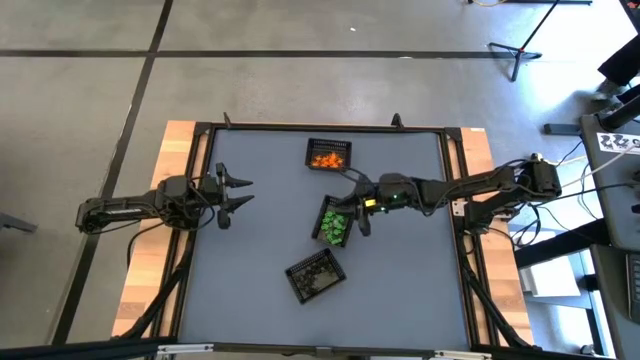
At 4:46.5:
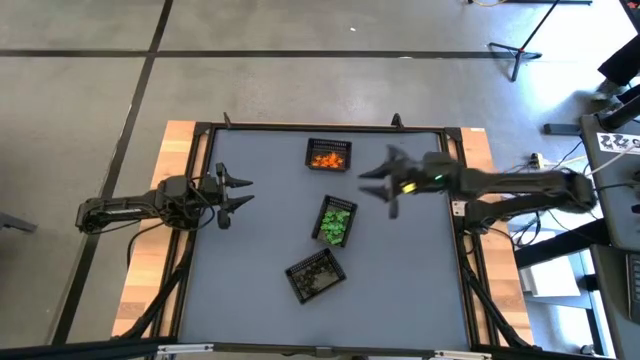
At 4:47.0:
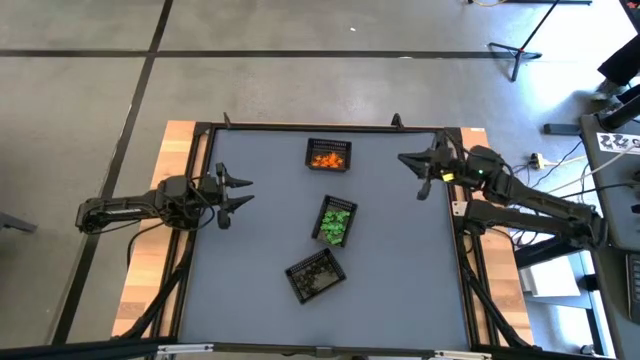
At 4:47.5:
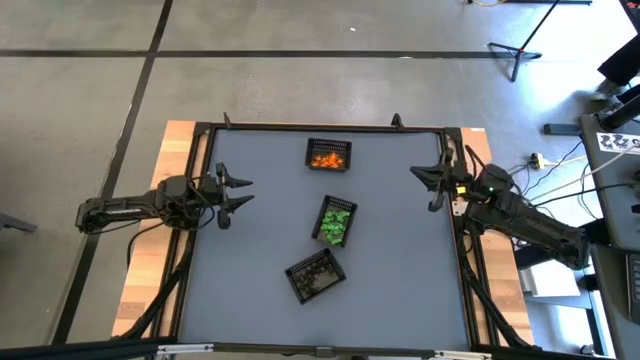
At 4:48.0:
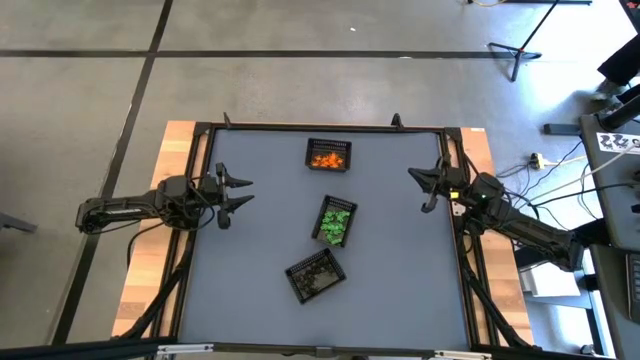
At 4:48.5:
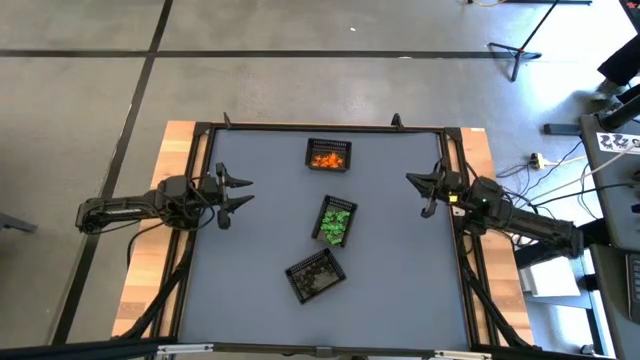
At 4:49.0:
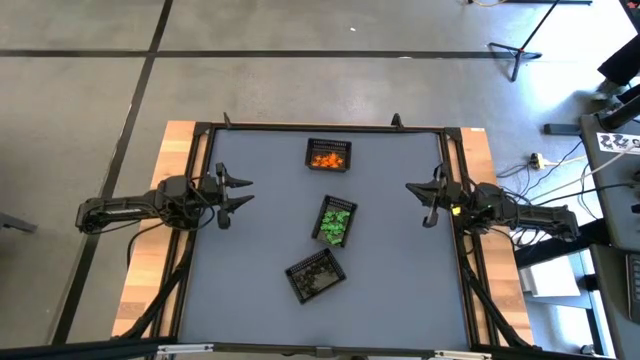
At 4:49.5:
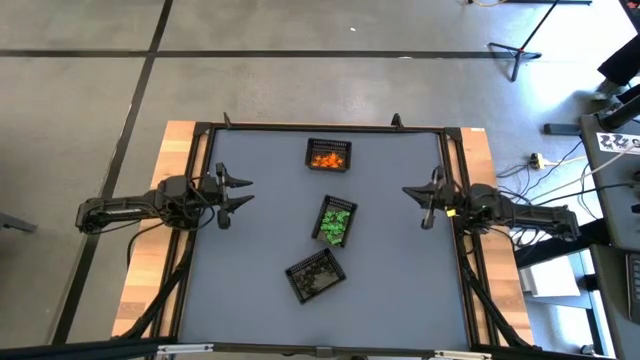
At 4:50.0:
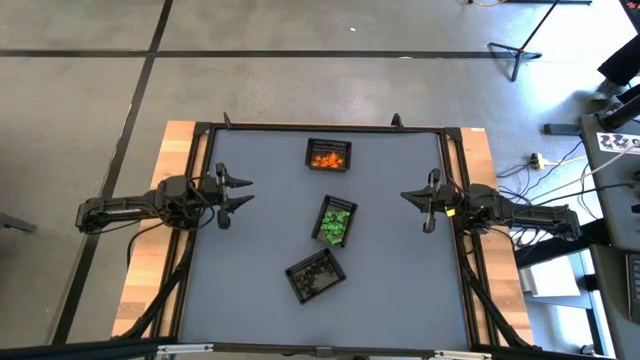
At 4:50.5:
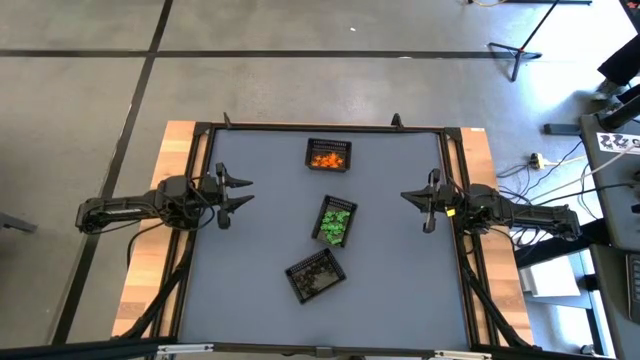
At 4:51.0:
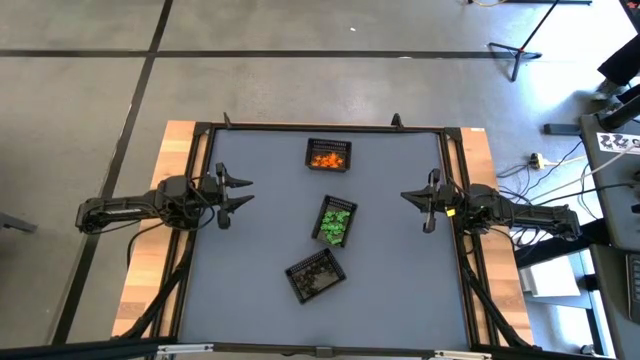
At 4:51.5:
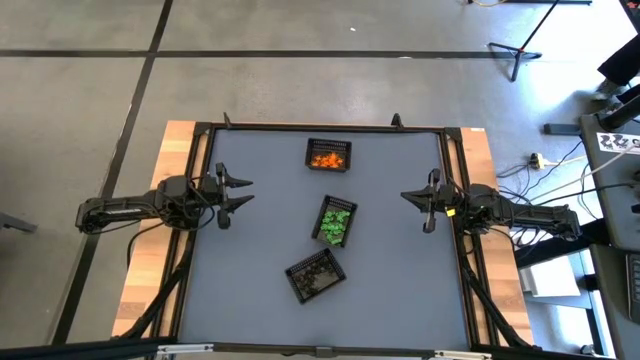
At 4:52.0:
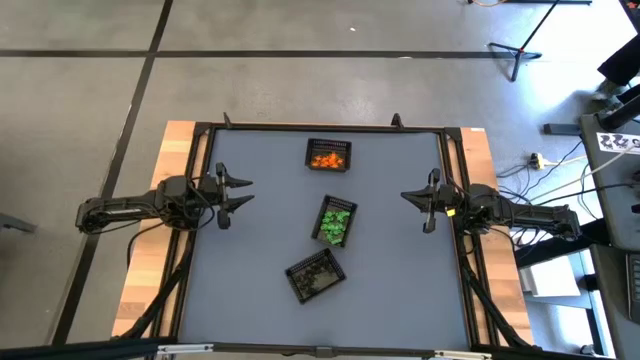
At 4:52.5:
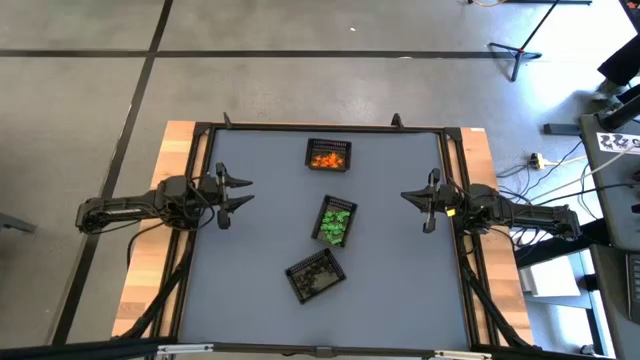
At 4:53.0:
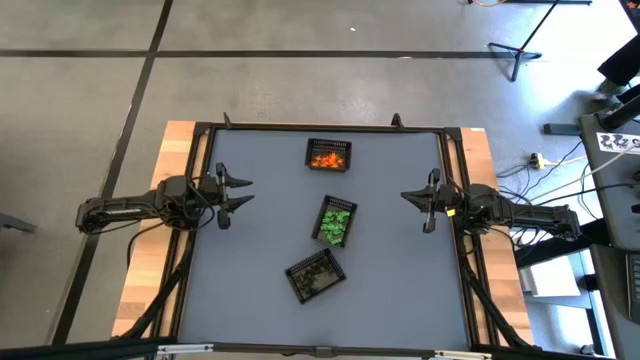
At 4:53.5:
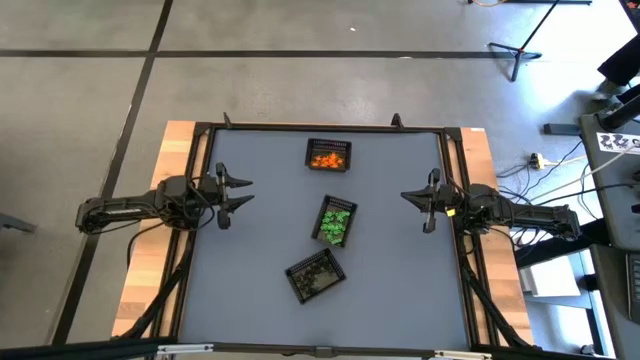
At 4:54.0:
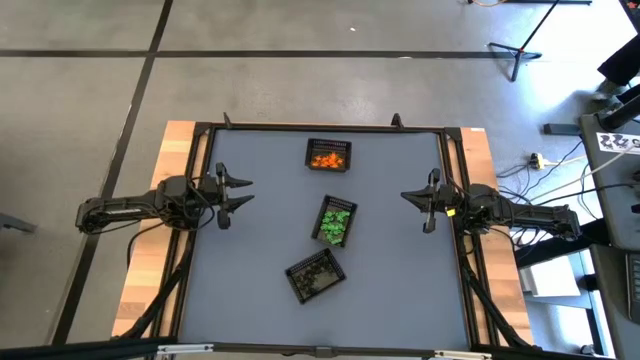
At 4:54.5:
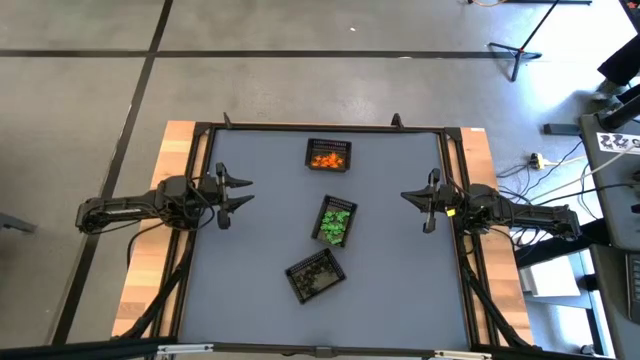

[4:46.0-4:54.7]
Task: Sort Halloween decoration
Return to Home Position

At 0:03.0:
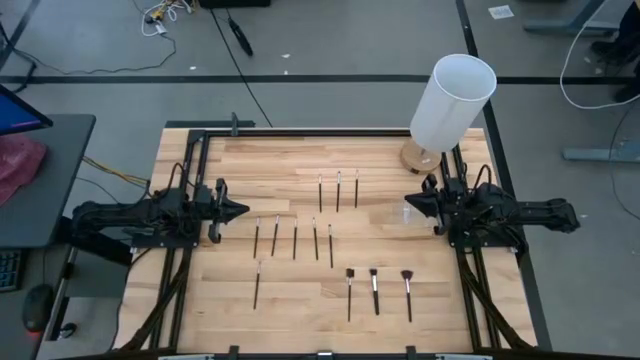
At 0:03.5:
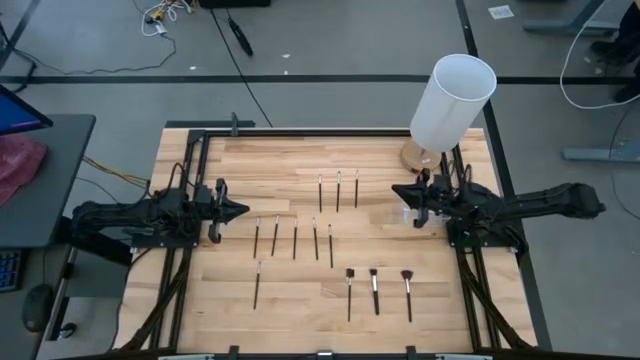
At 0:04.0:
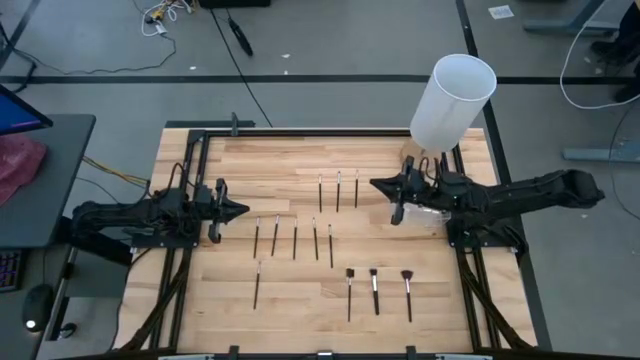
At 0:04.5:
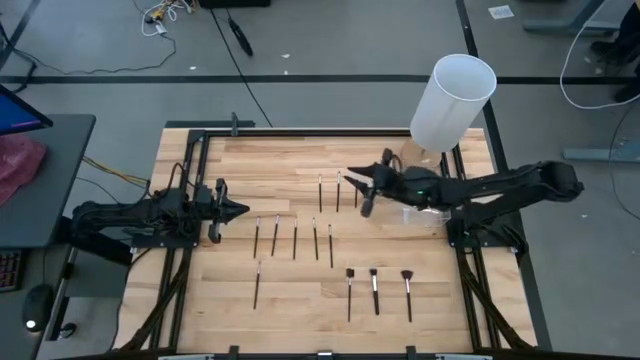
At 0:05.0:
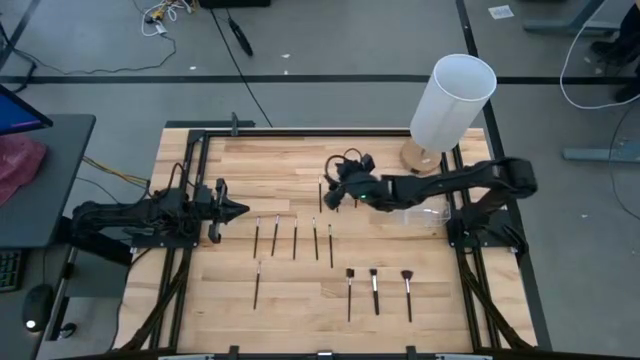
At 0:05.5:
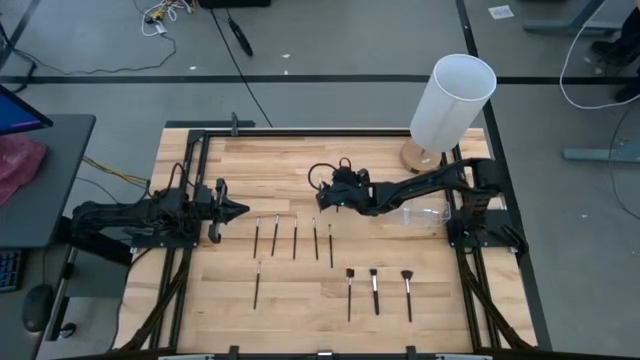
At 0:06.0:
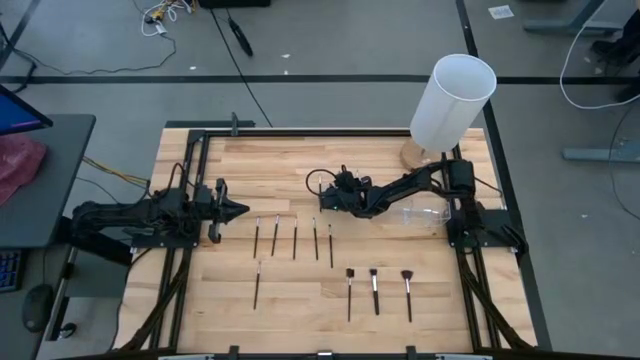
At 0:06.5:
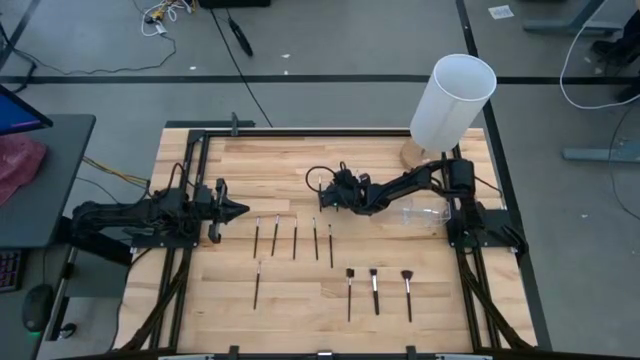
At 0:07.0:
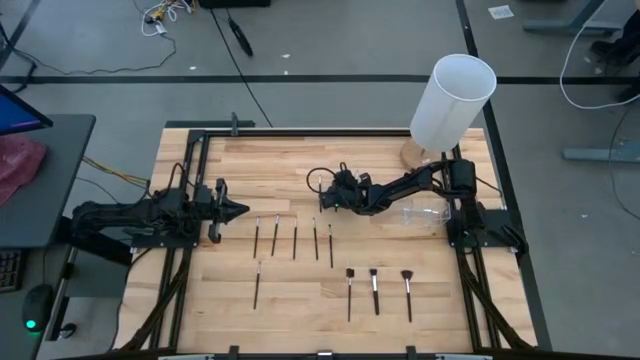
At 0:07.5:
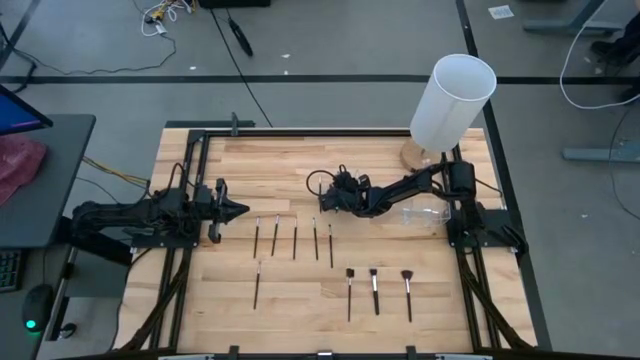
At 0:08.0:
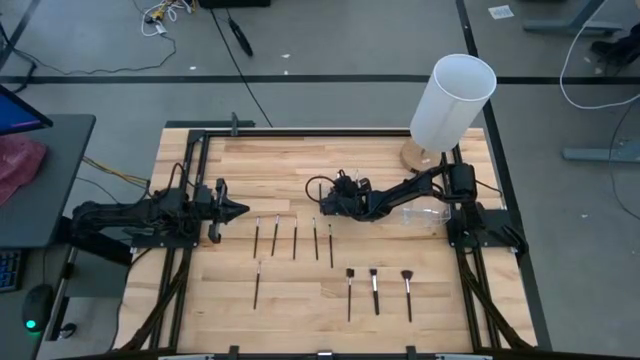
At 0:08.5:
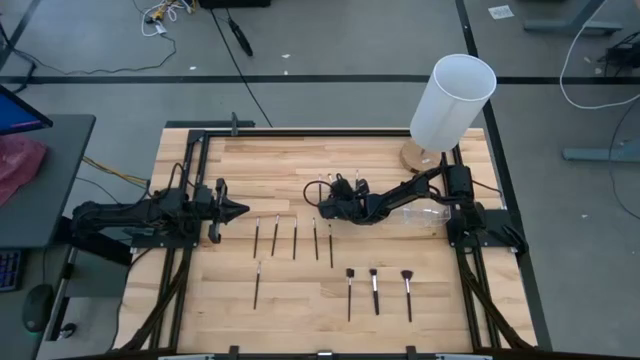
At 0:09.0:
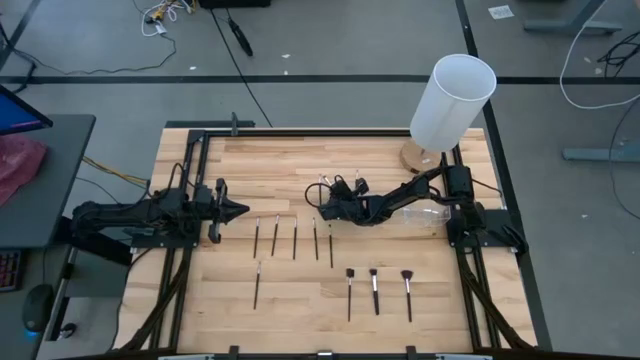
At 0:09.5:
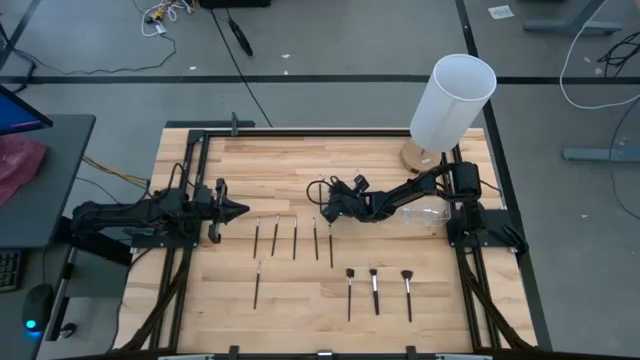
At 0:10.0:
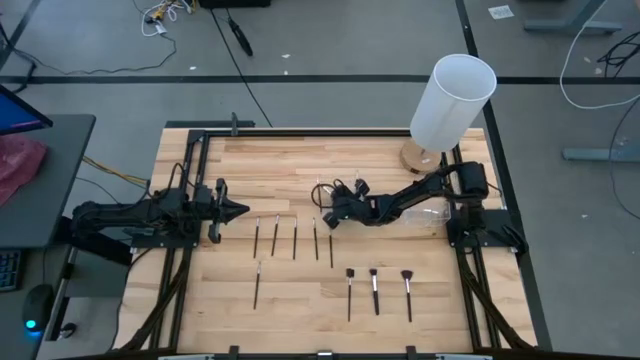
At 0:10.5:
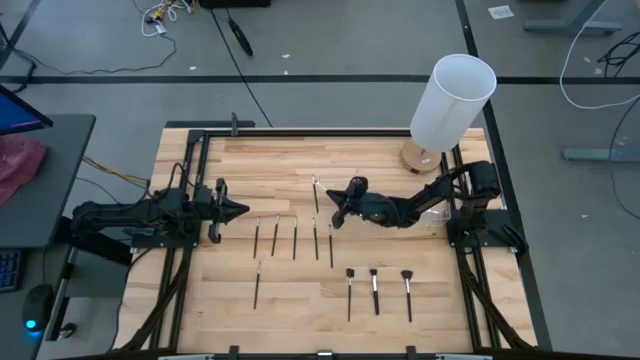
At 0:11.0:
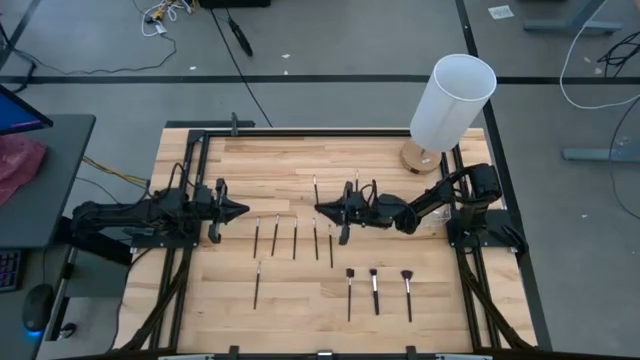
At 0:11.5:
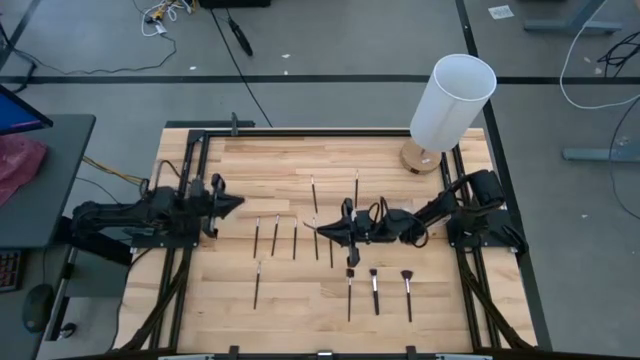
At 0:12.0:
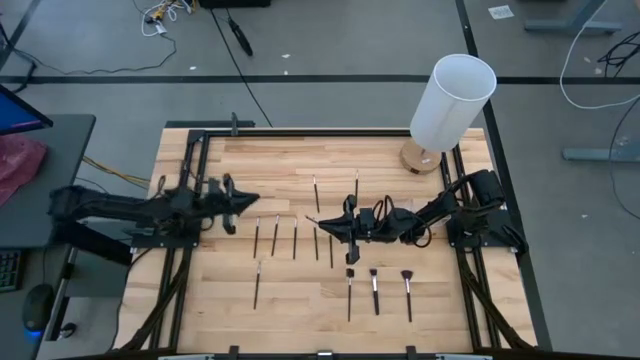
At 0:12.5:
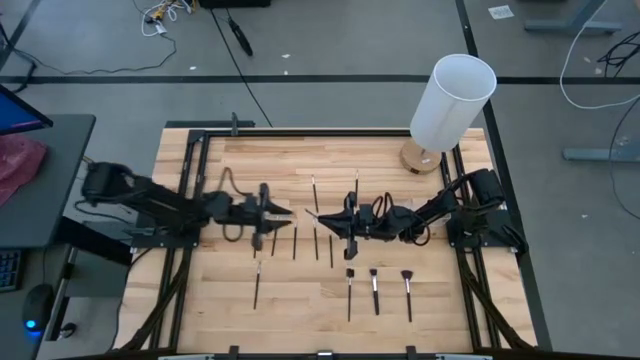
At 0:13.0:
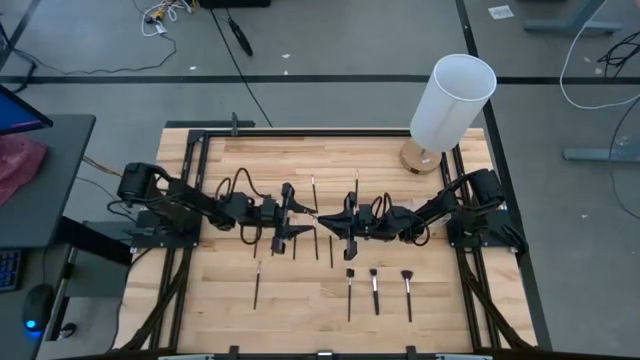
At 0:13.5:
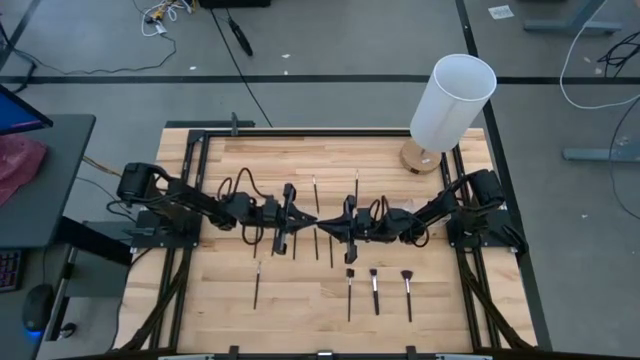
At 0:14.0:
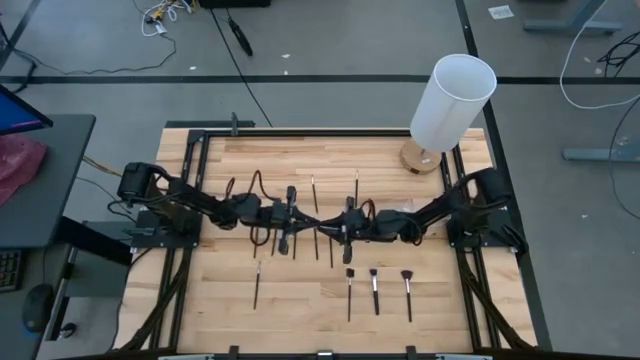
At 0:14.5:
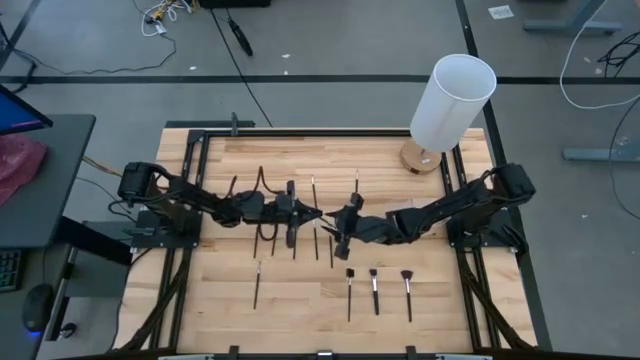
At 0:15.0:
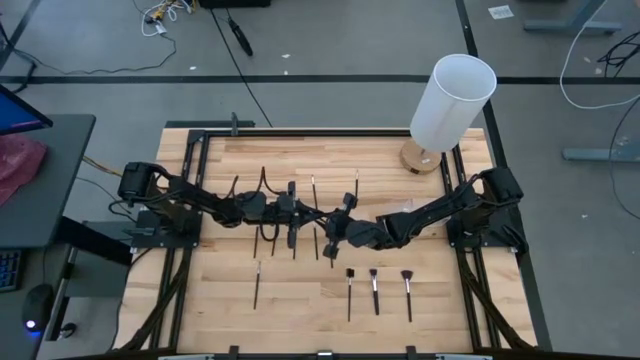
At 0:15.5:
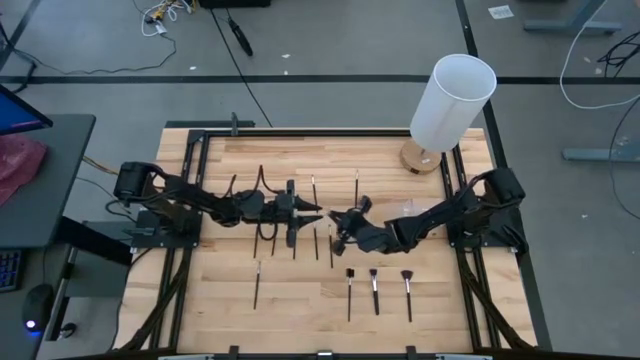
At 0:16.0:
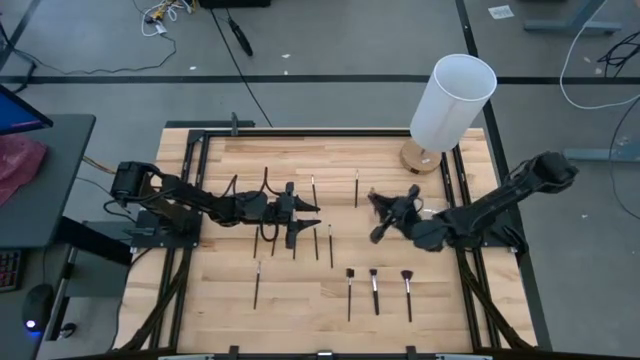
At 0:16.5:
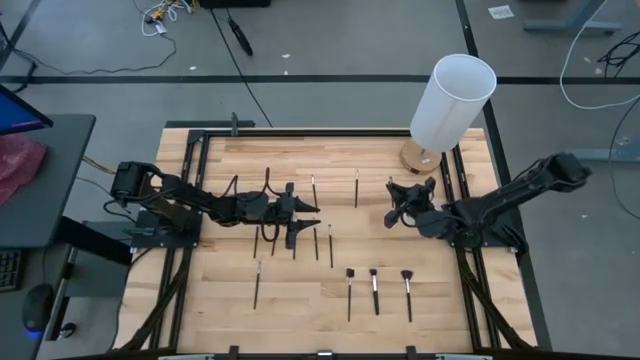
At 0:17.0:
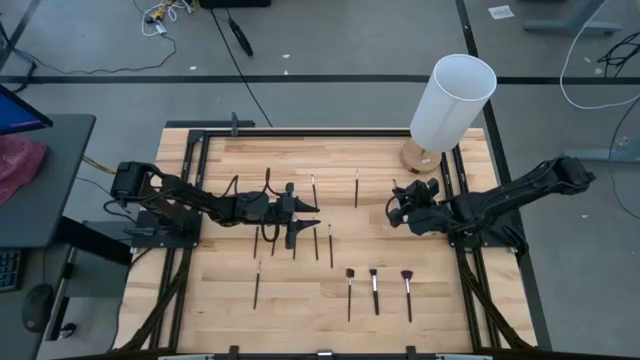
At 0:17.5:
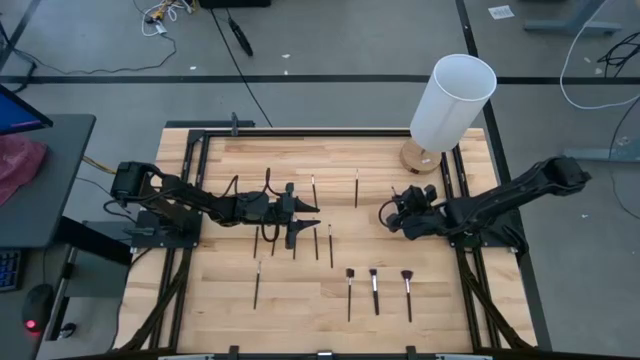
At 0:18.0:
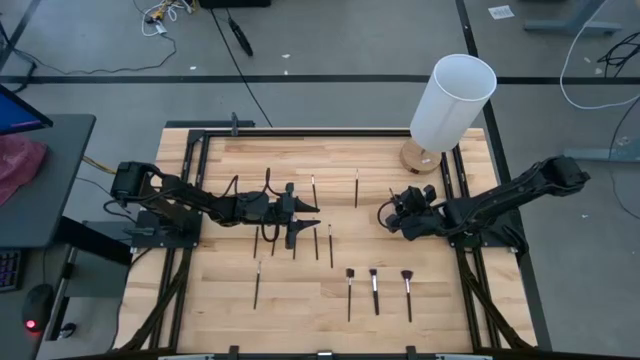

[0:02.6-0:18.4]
Task: Put items in baskets/containers
Put the black eyeshadow brush into the transparent organizer
